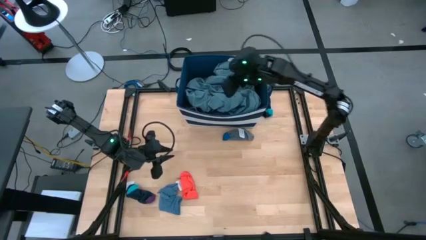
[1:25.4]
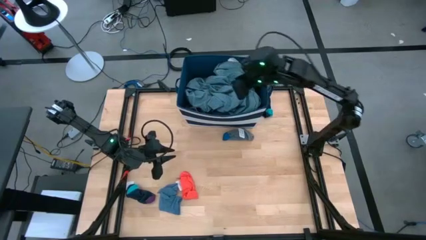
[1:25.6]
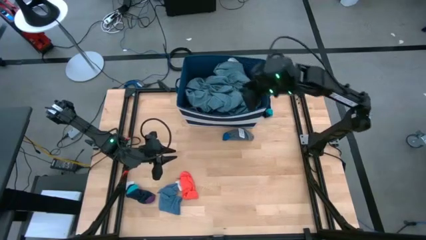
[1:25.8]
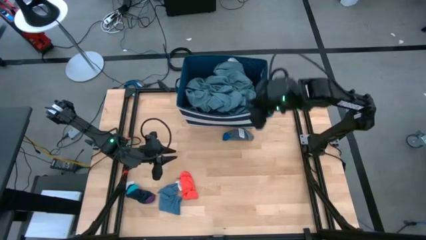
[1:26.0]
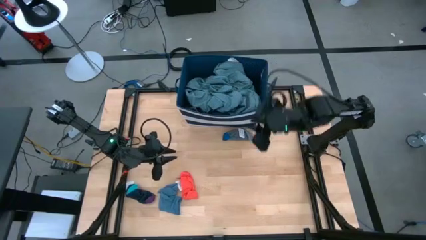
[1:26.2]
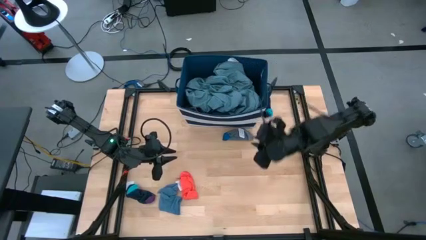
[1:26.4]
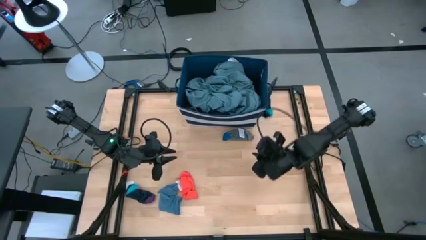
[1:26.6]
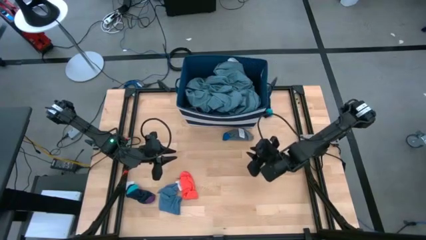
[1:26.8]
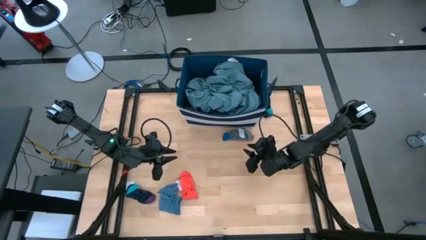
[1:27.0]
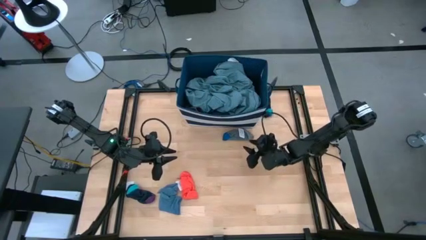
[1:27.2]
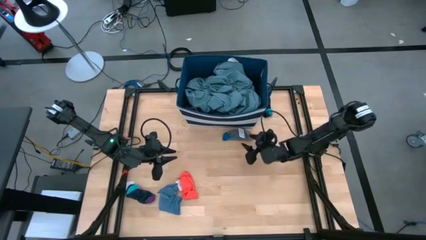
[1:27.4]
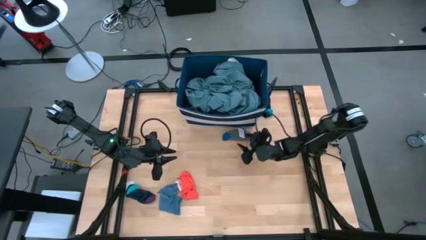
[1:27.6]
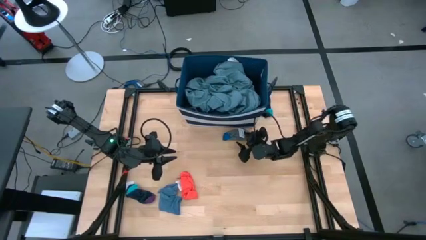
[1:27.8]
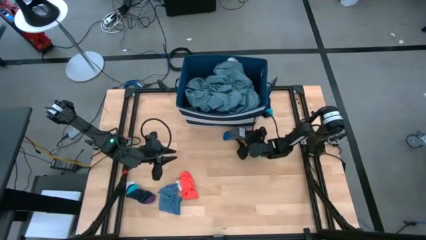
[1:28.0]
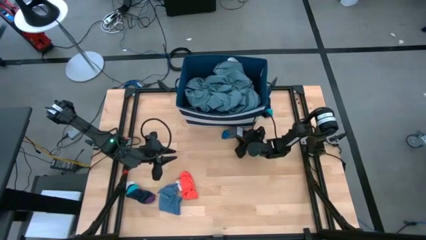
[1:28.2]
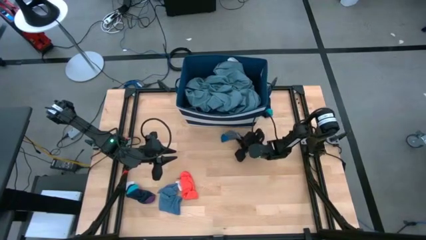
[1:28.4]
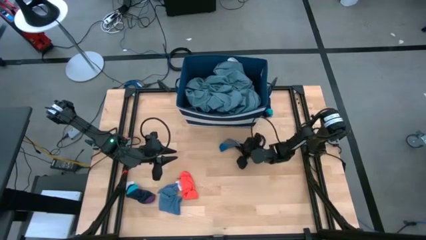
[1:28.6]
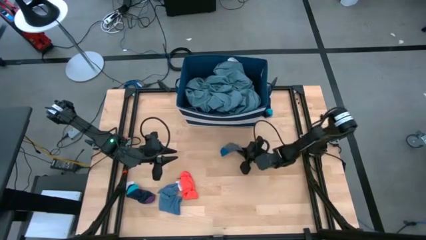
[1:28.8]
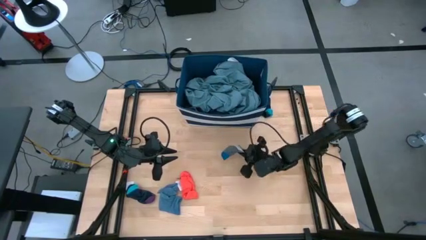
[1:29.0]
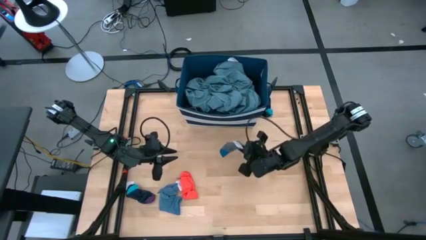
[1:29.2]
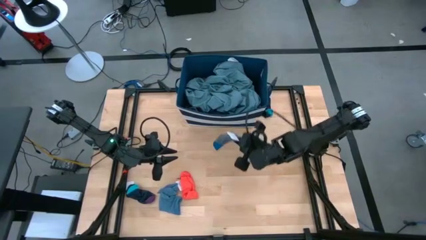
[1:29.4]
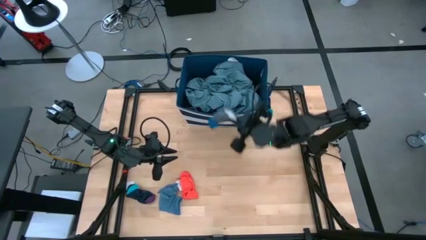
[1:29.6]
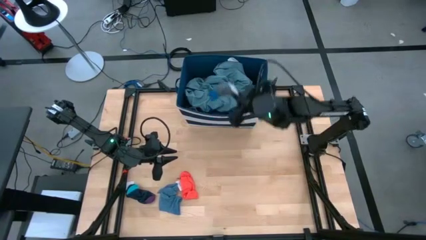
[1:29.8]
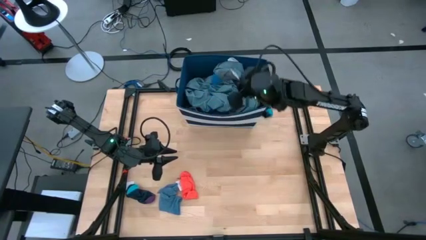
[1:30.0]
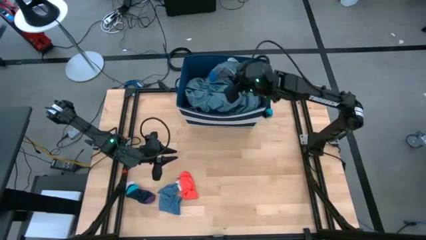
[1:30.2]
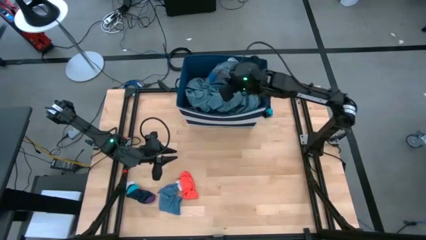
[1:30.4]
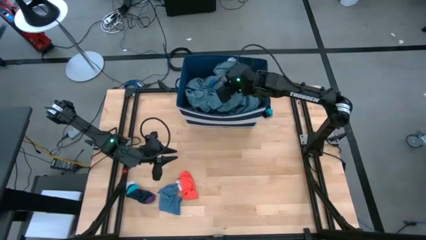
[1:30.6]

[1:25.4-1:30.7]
Task: Sort clothes
Put the gray sock into the laundry organizer

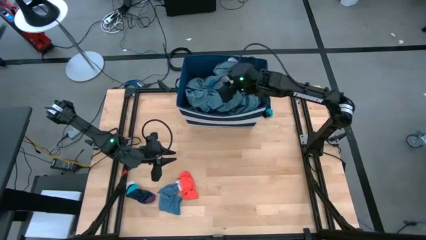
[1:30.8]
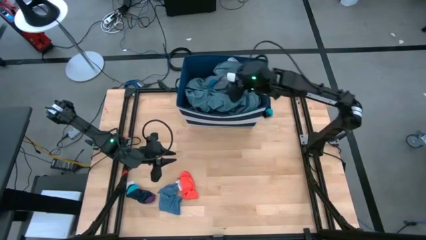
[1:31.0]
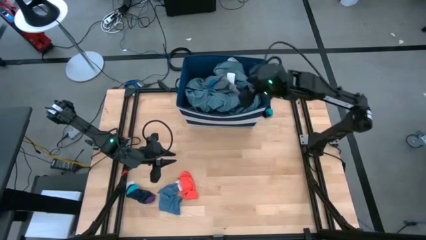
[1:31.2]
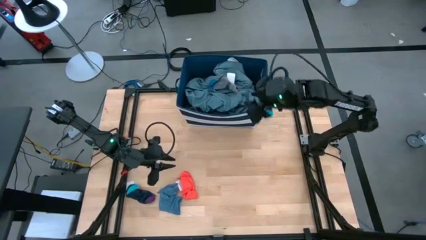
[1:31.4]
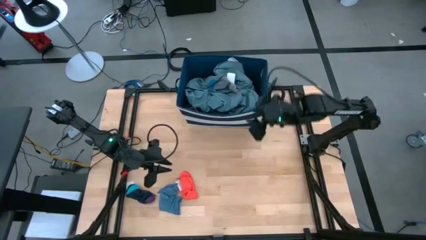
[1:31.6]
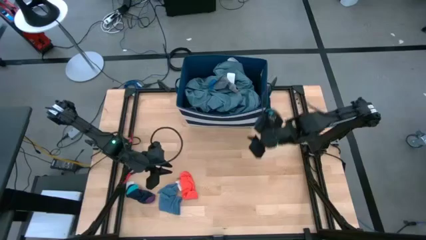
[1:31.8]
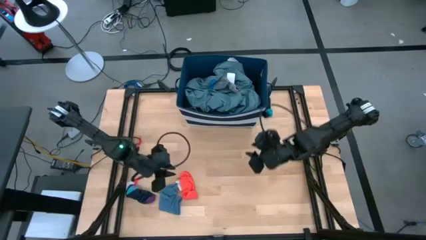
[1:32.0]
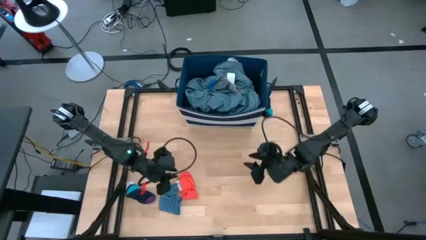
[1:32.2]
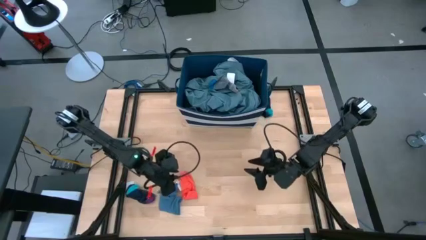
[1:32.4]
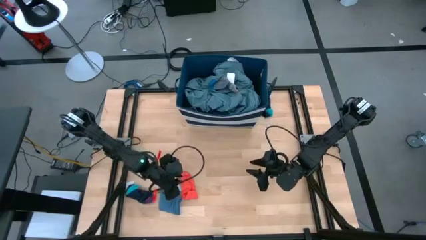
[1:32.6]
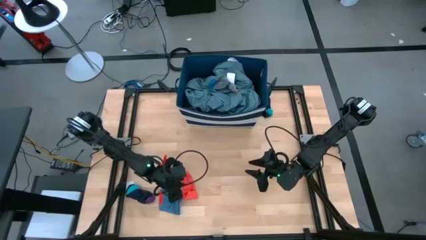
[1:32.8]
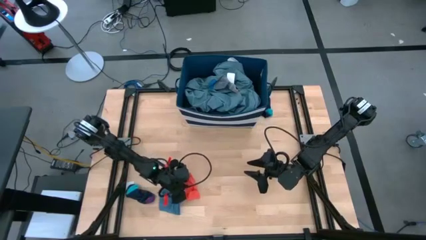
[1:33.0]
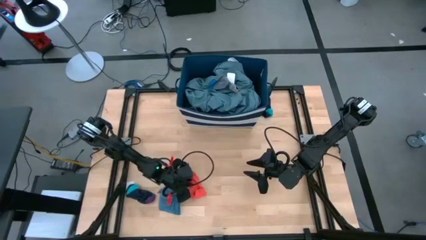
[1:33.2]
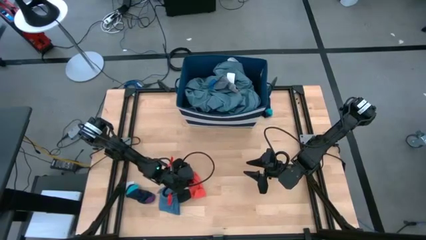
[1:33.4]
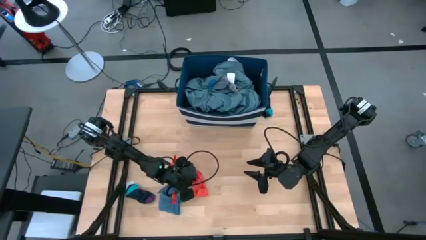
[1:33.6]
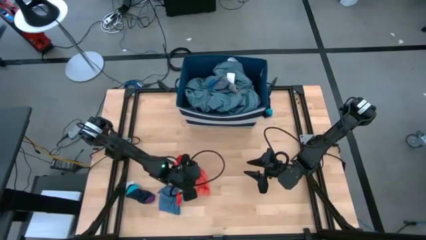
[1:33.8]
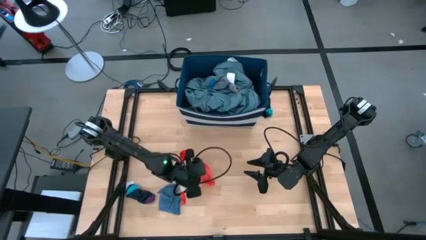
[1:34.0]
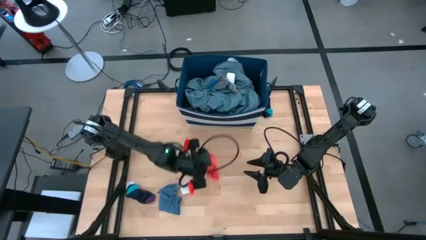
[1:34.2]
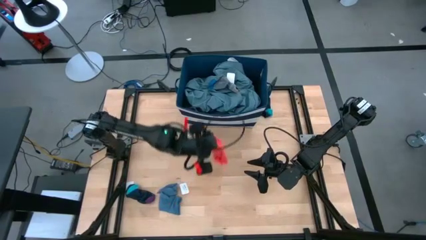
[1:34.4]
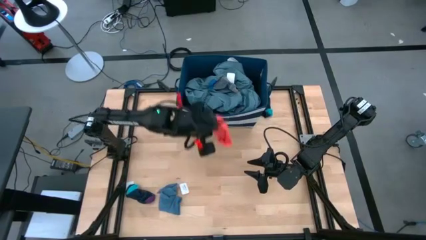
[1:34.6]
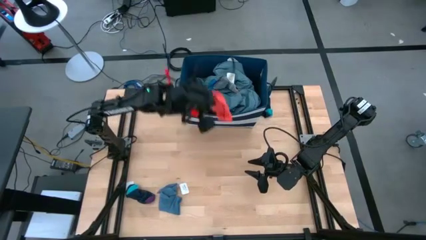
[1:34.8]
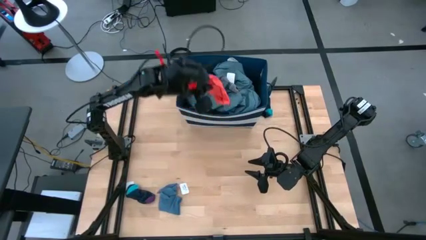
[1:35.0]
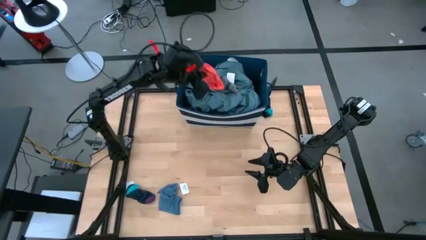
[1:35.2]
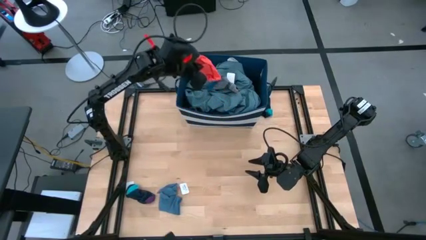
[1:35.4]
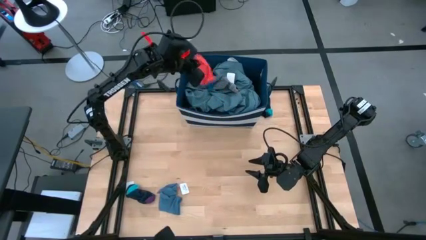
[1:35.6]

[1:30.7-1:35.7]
Put the orange sock into the laundry organizer

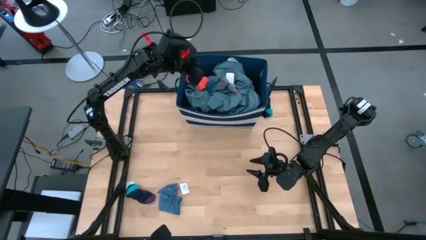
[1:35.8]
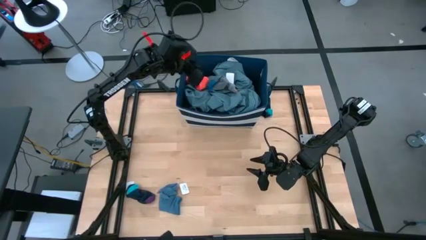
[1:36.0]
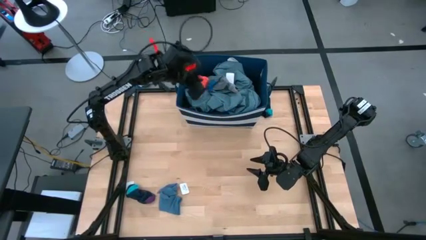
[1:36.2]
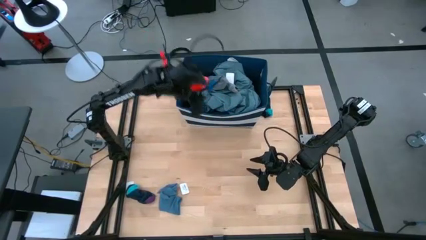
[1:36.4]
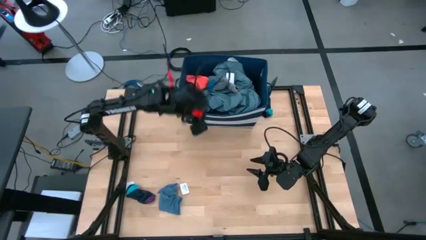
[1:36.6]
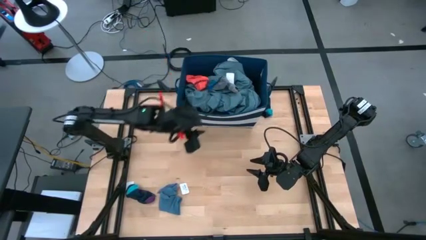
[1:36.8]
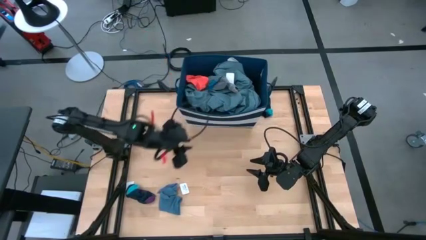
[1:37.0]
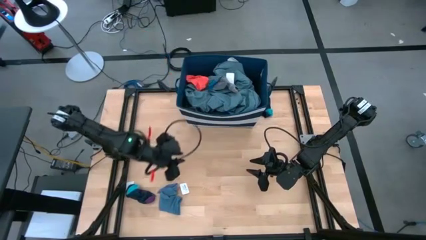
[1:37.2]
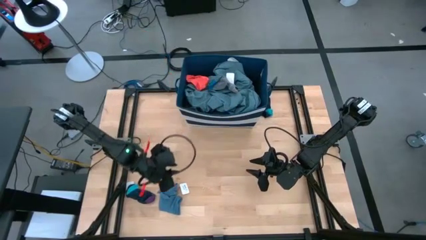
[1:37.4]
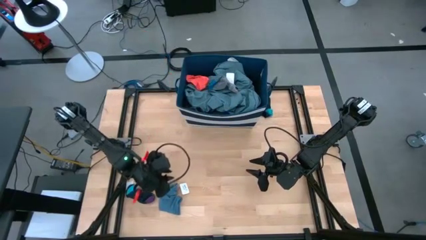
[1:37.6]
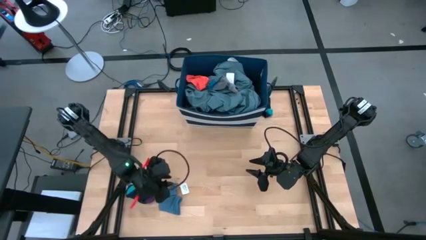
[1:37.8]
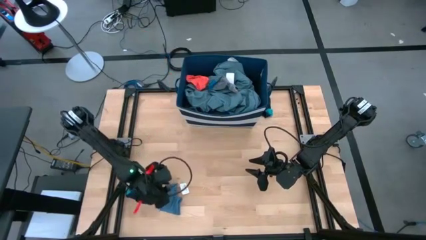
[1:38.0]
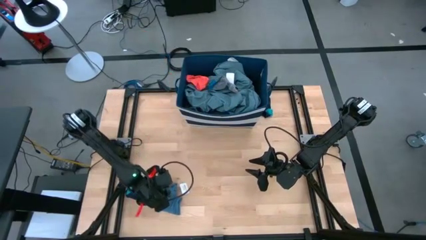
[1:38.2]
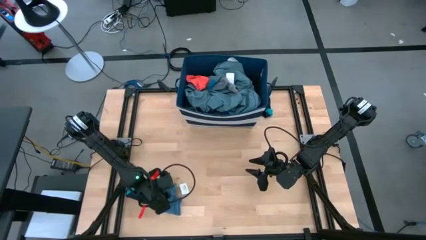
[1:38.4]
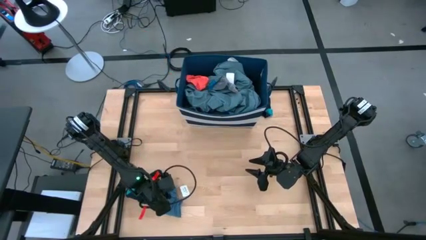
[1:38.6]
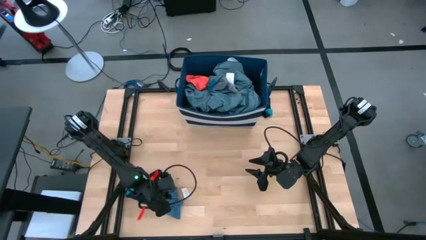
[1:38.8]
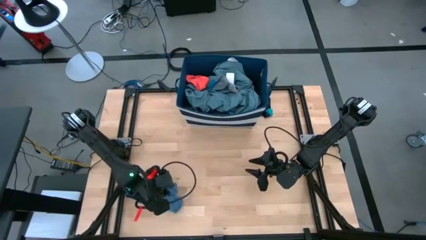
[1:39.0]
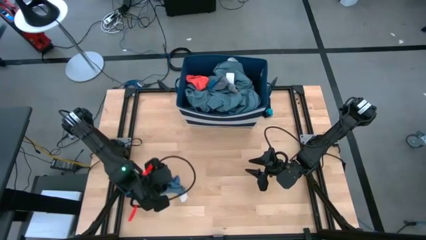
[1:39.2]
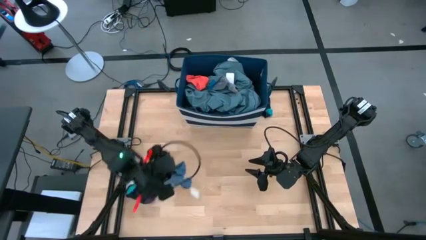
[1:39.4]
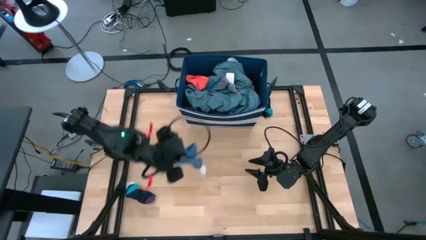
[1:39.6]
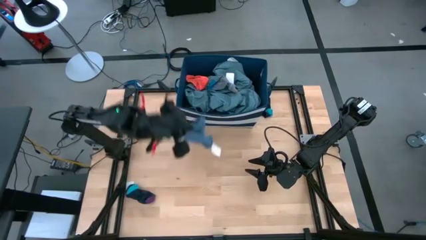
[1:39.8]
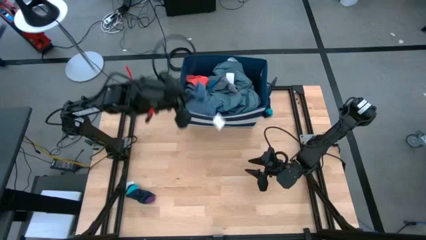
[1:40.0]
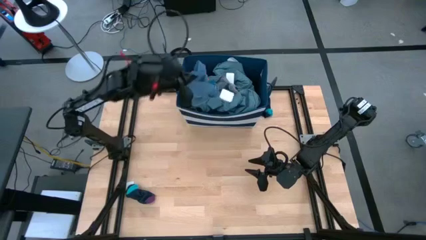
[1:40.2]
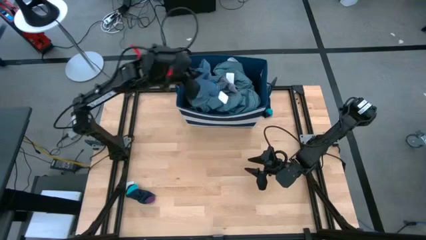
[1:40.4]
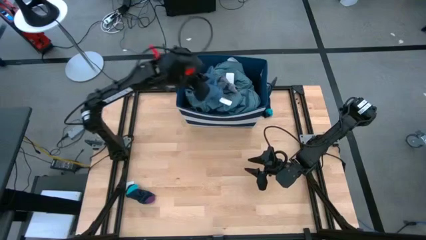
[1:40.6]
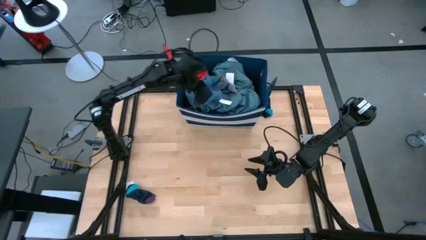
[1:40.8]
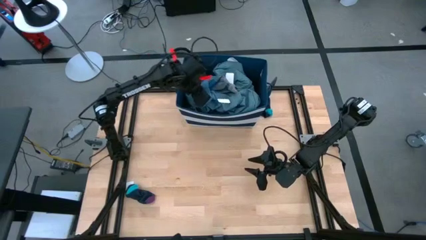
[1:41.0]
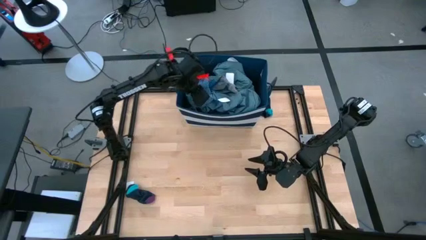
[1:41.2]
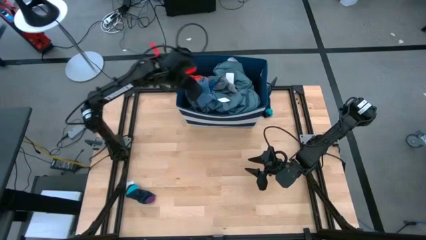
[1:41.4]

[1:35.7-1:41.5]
Put the blue sock into the laundry organizer
